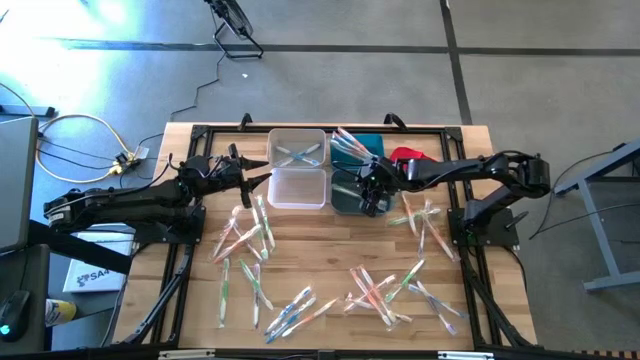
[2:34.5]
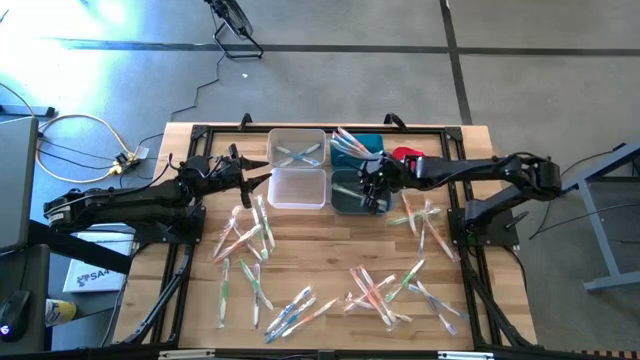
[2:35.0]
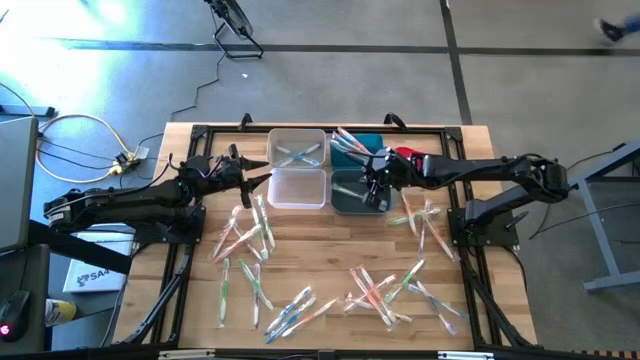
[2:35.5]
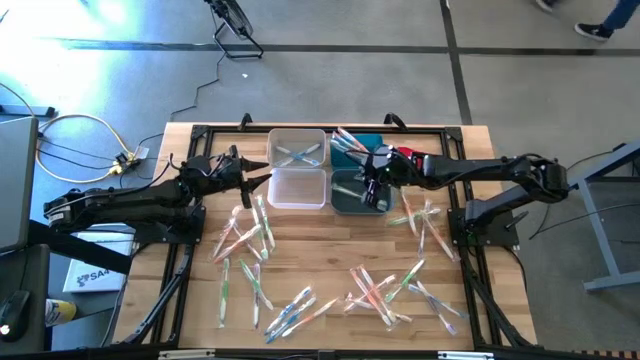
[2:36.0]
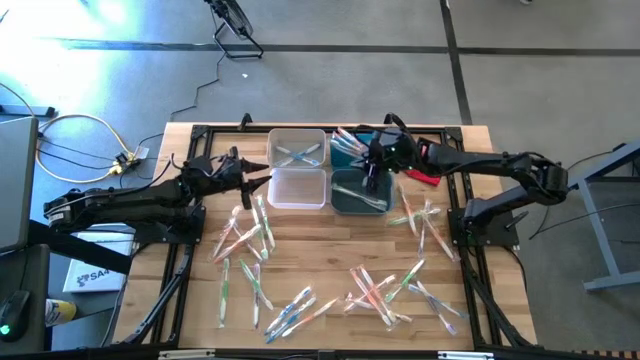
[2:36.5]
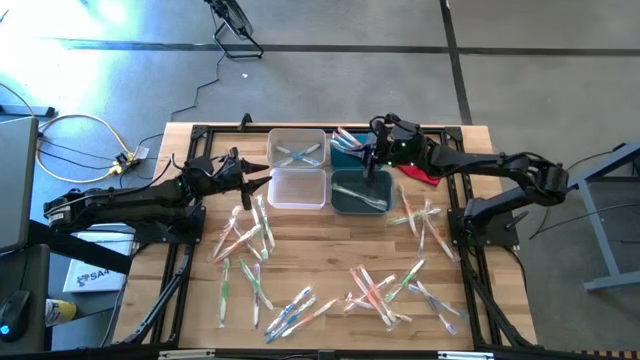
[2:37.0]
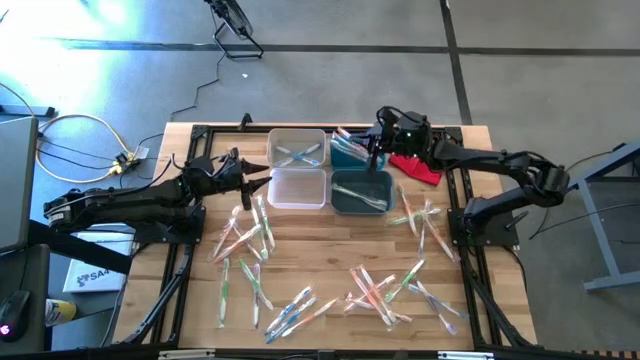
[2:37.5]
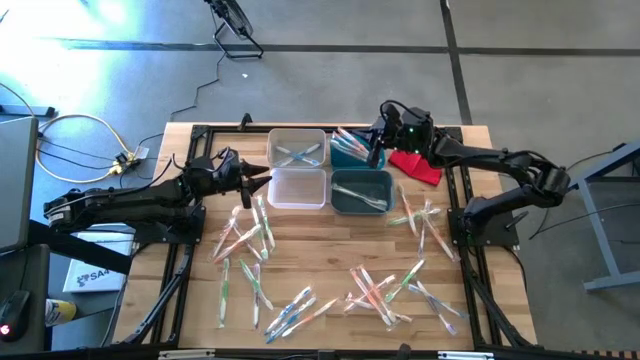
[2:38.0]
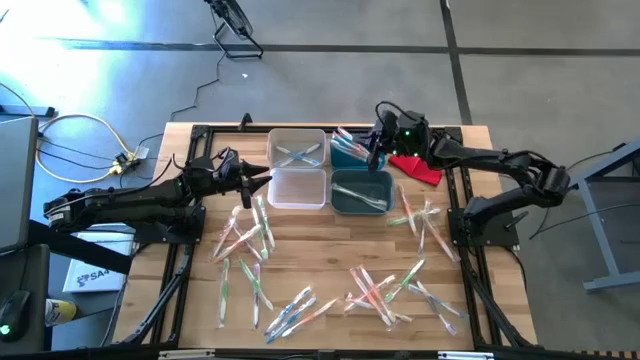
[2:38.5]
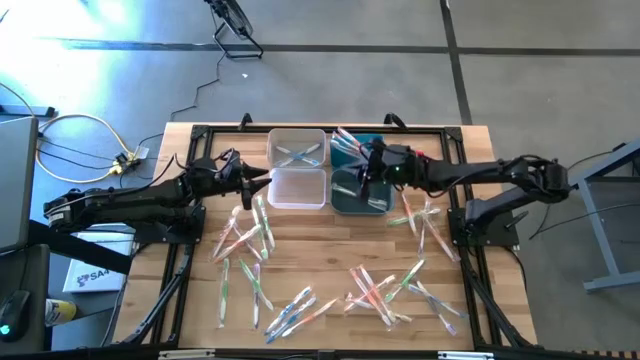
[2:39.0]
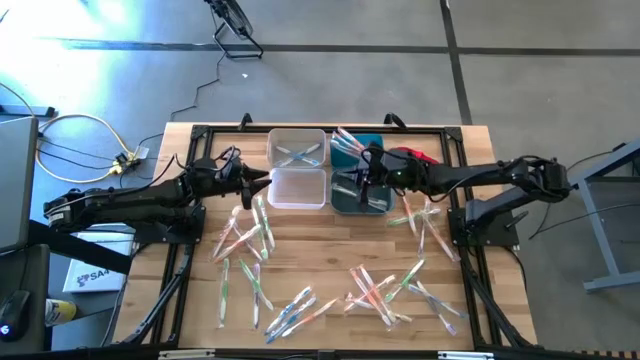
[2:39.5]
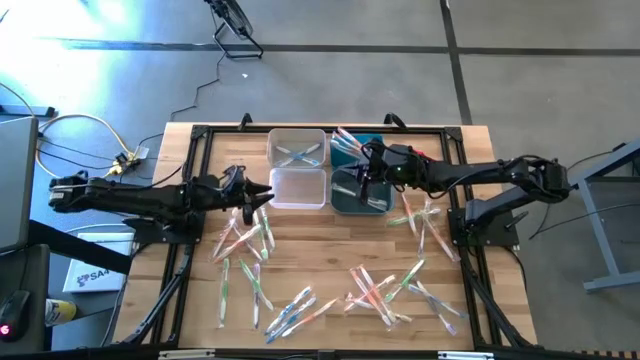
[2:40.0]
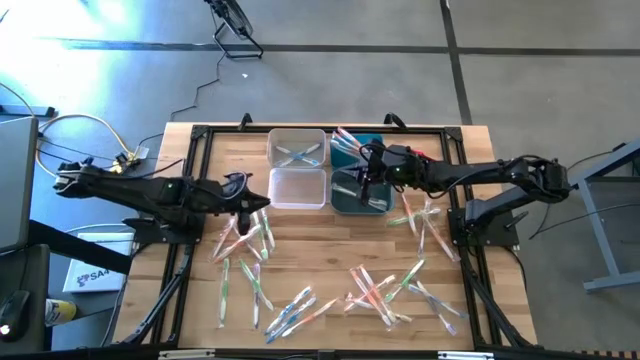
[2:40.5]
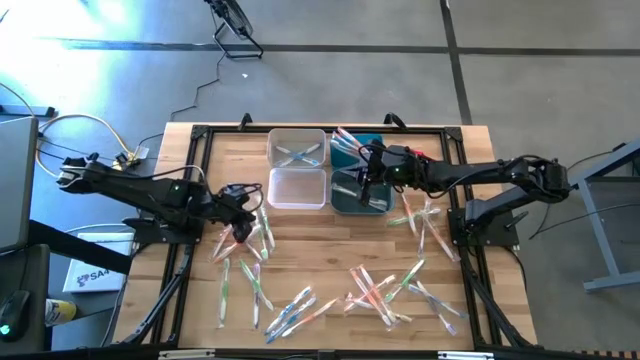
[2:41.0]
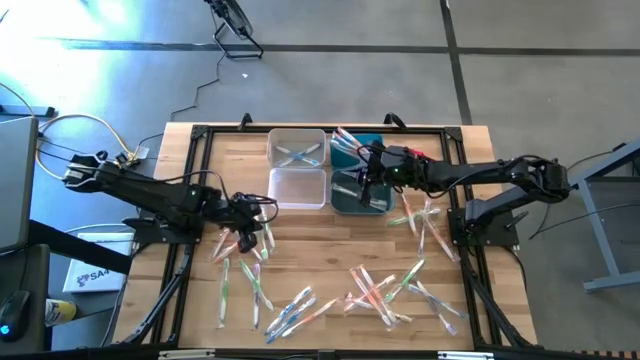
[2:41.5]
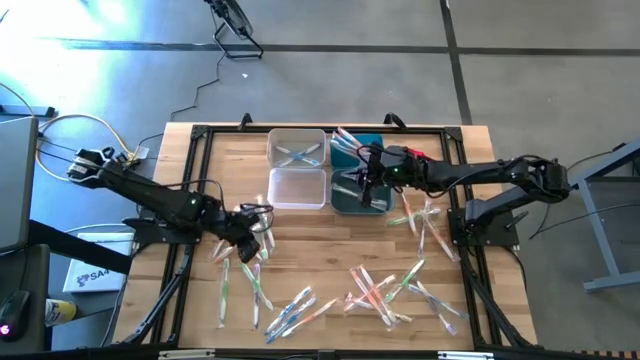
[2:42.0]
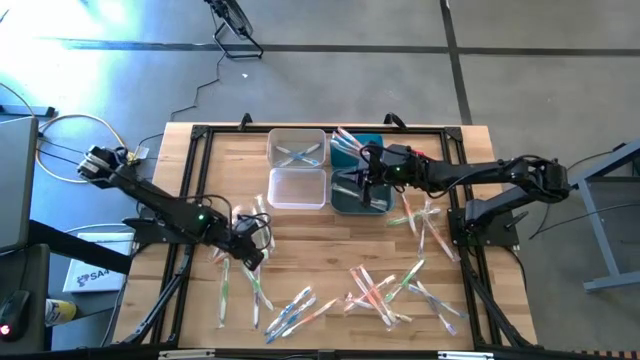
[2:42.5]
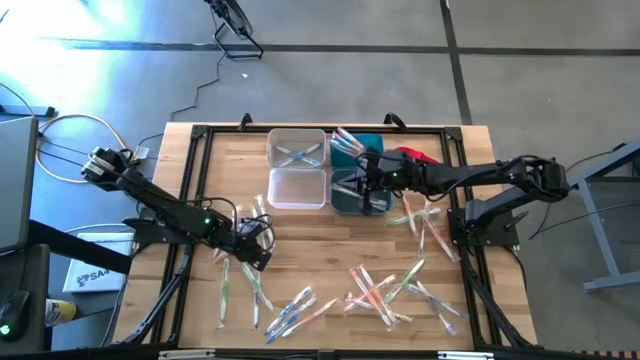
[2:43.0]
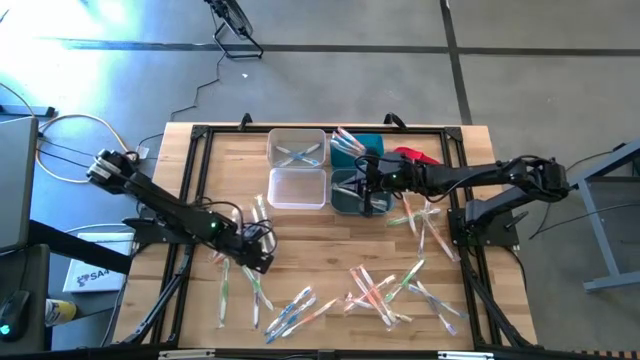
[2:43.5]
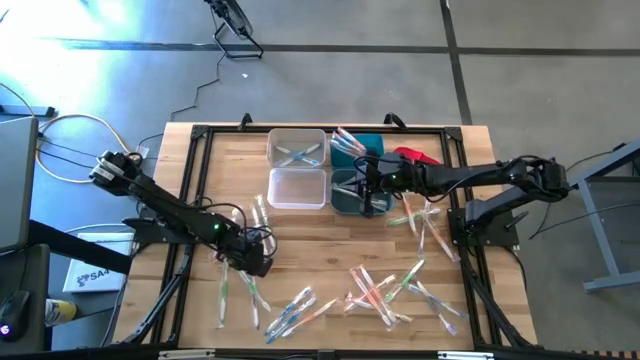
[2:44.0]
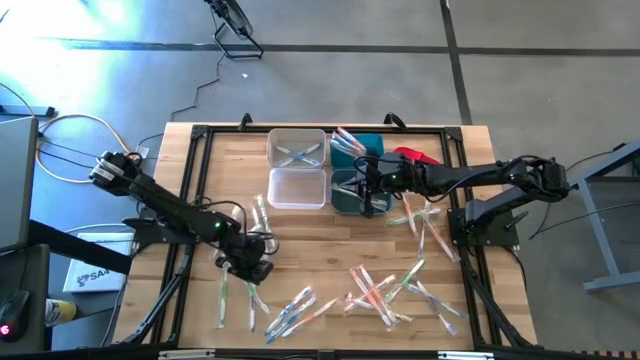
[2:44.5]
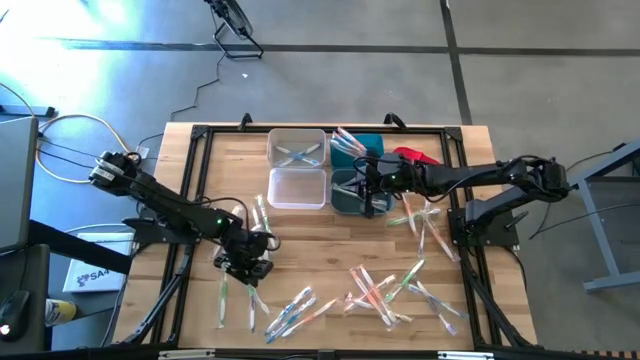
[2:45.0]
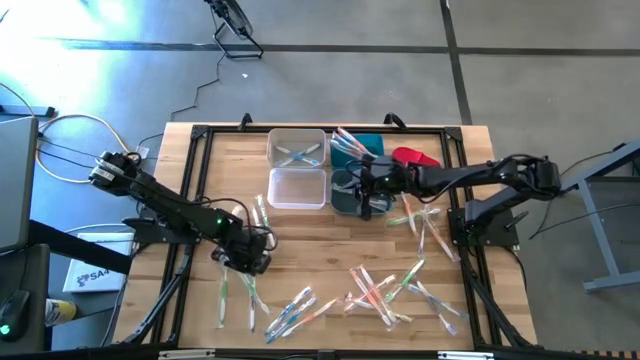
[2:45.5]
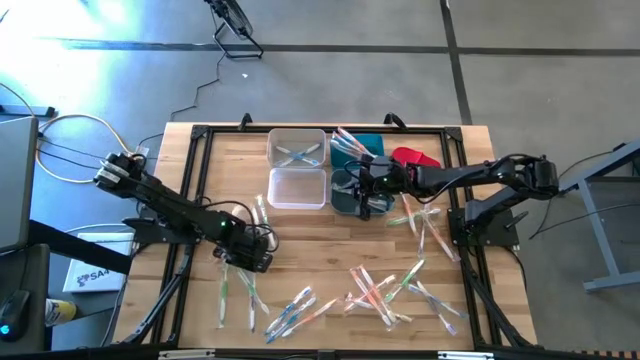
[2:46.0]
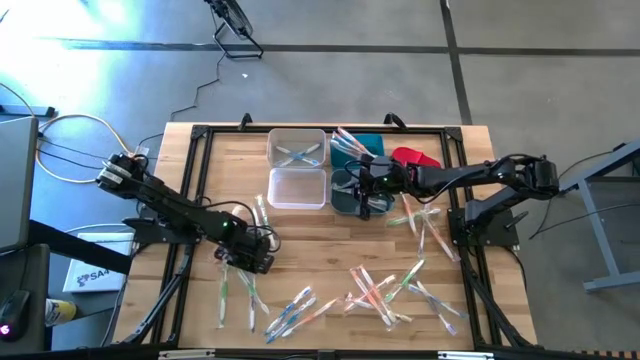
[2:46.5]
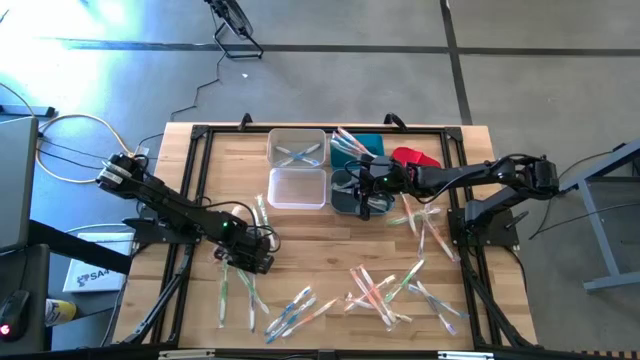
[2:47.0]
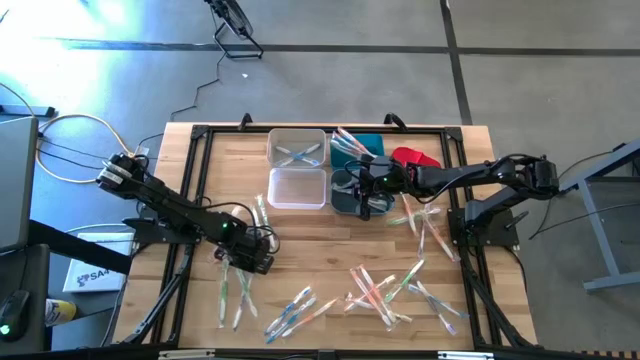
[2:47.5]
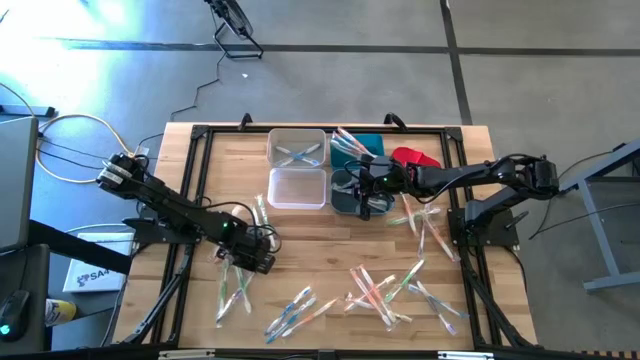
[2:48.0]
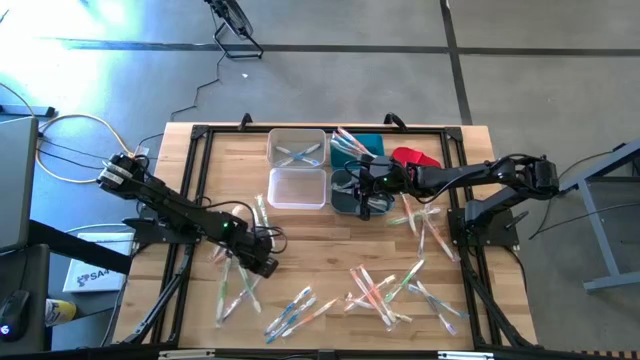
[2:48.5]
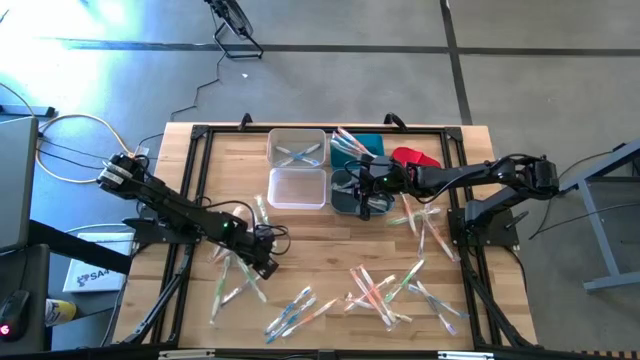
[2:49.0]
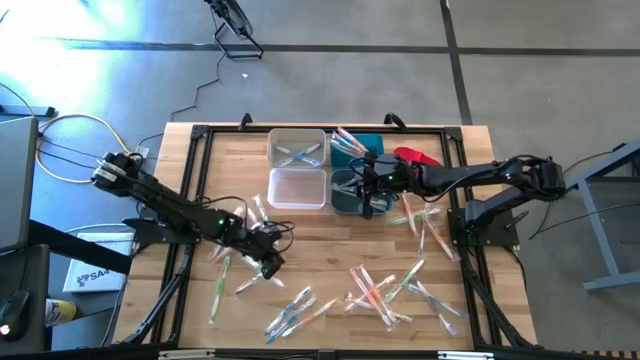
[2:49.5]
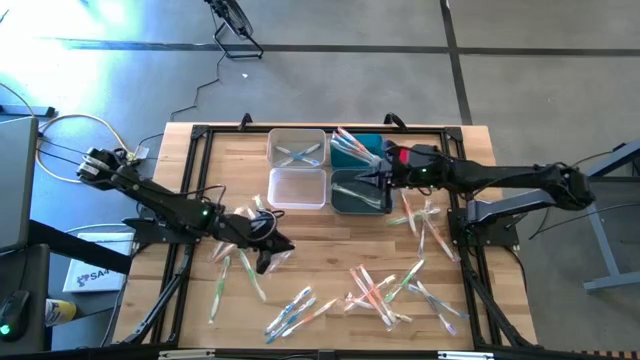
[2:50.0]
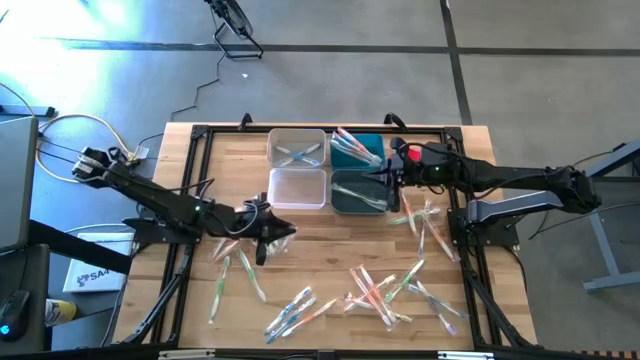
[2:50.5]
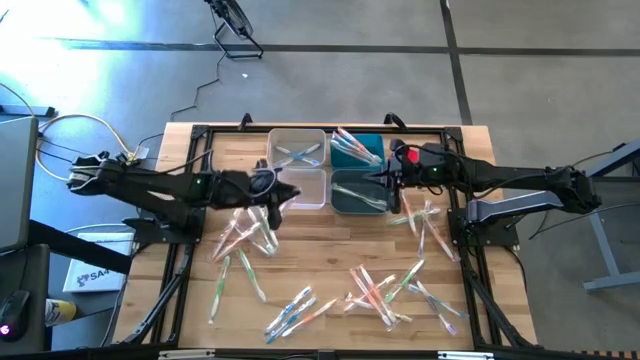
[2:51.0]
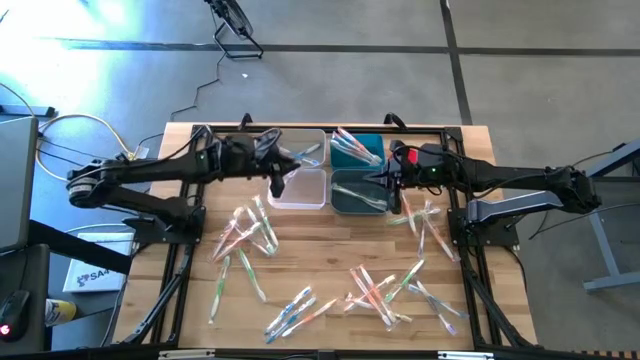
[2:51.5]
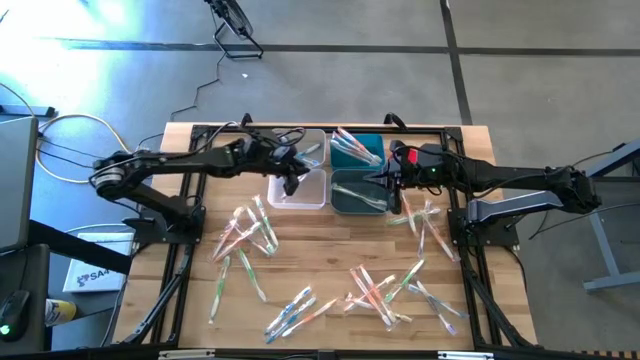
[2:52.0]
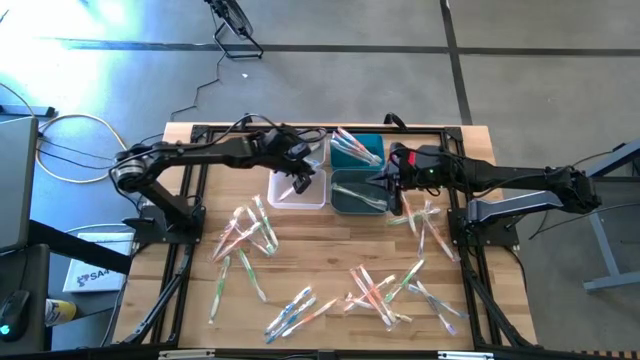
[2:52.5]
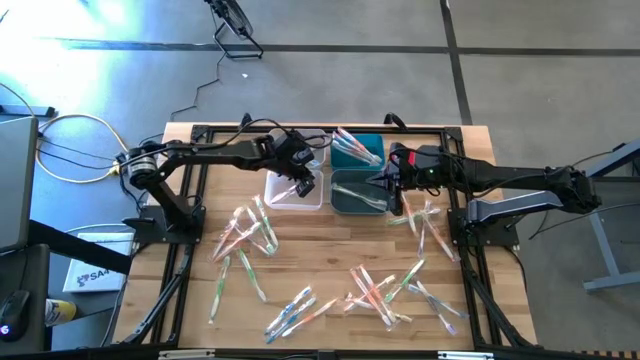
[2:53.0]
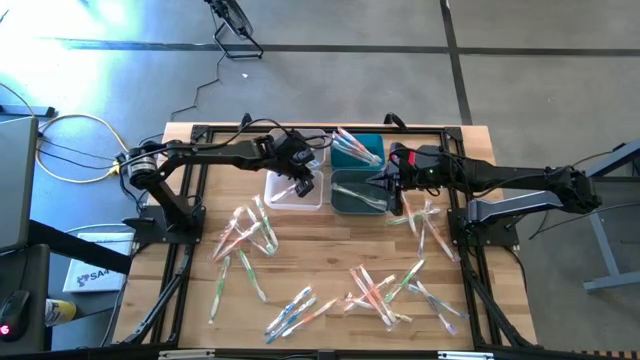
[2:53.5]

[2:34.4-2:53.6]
Task: Pick & Place Toothbrushes
Put the purple toothbrush into the transparent bin

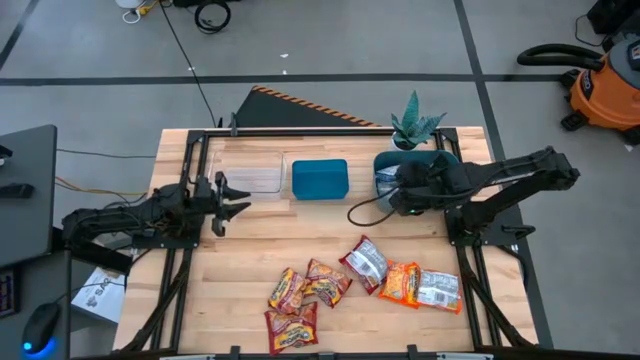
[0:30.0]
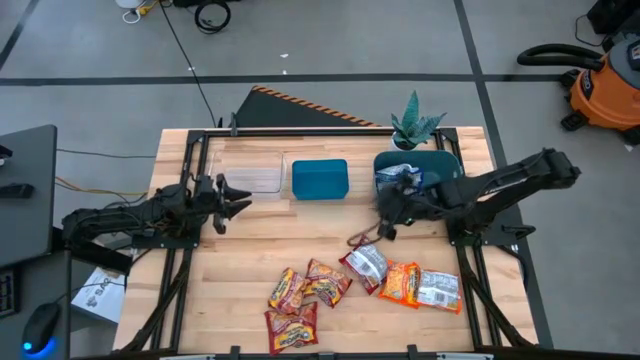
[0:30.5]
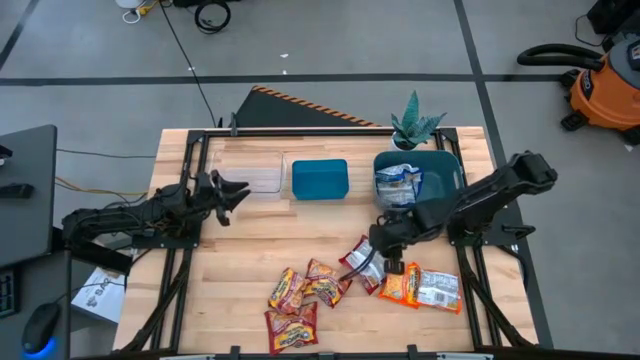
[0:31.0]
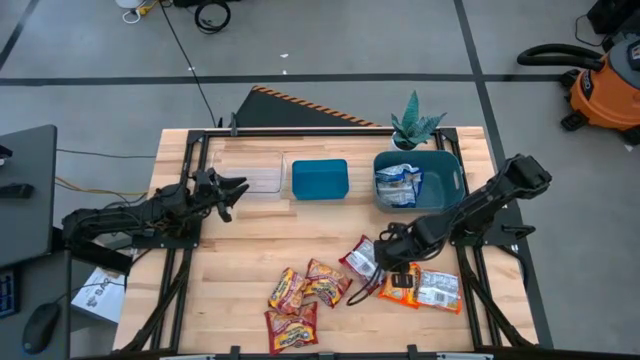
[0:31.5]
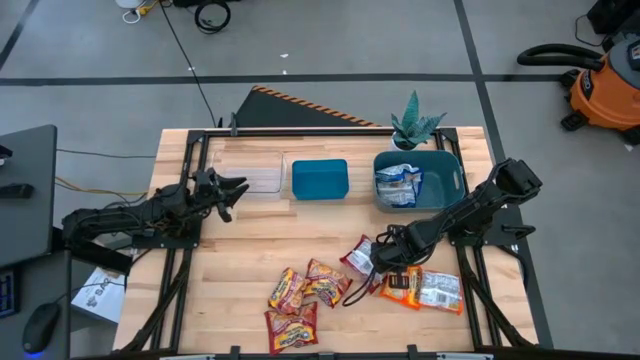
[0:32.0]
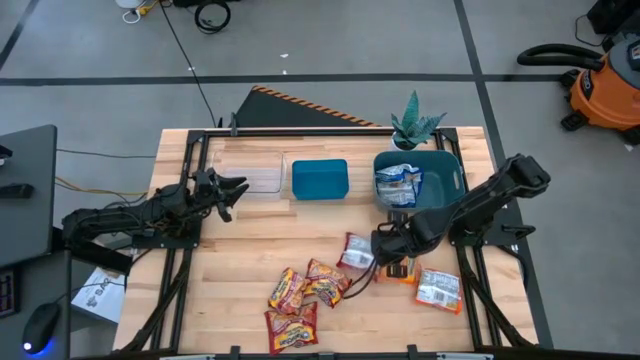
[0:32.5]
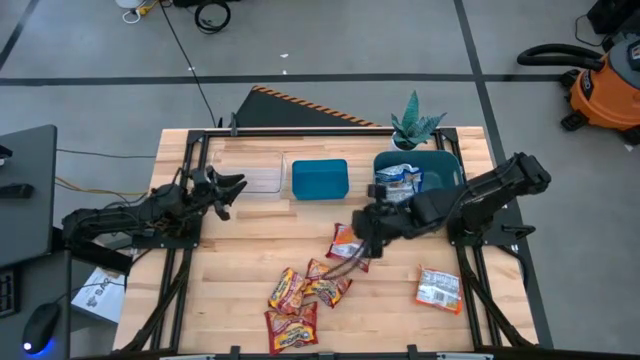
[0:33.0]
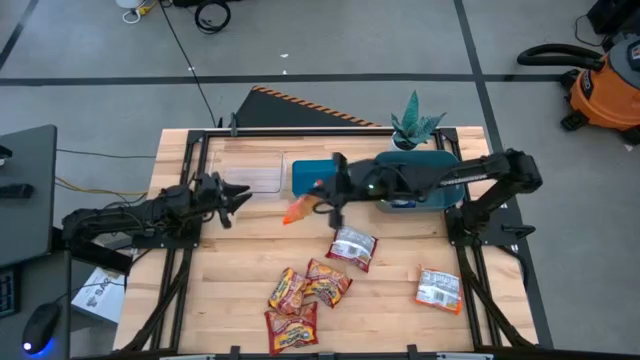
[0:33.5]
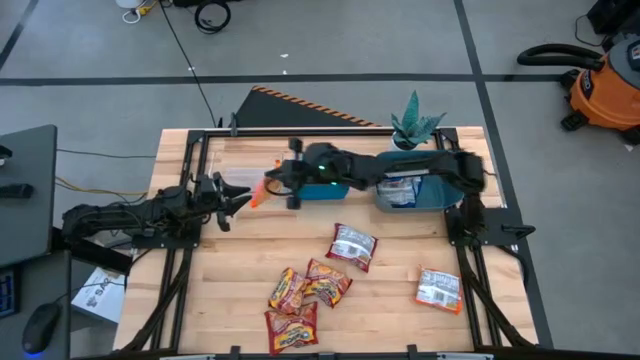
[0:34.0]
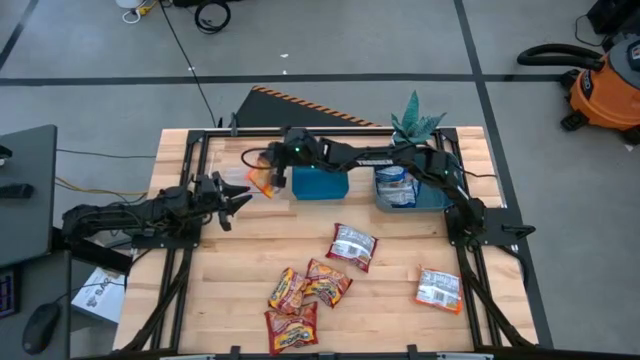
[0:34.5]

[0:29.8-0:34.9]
Task: Sort Maruchan noodles
Put the orange noodle pack into the transparent bin
